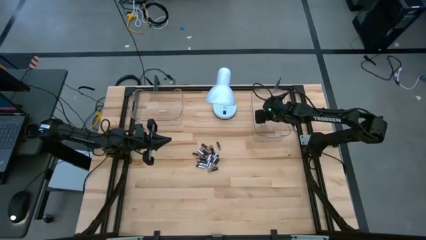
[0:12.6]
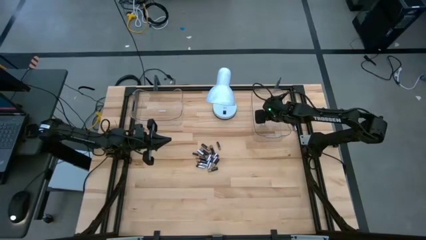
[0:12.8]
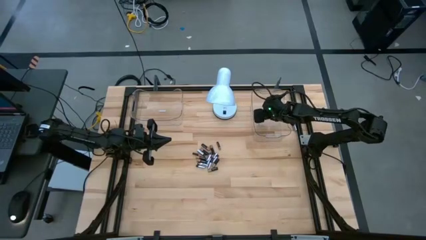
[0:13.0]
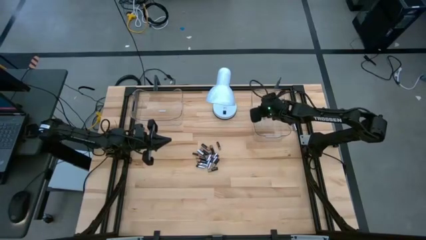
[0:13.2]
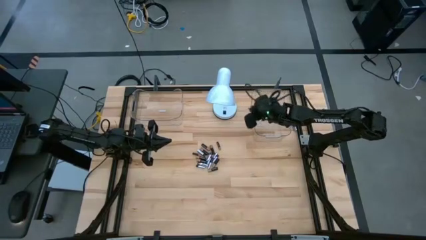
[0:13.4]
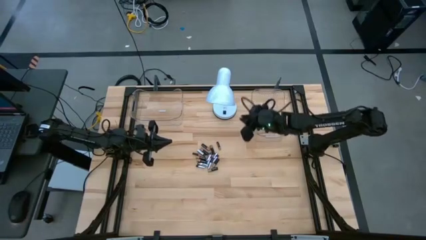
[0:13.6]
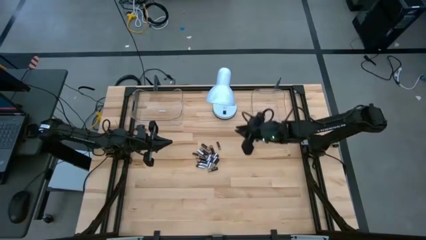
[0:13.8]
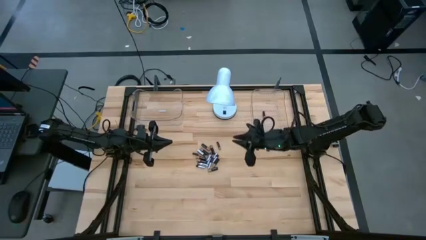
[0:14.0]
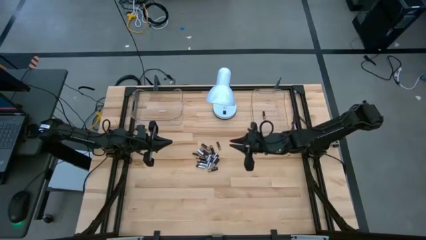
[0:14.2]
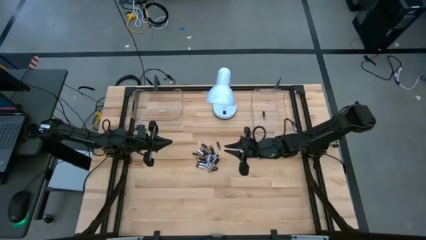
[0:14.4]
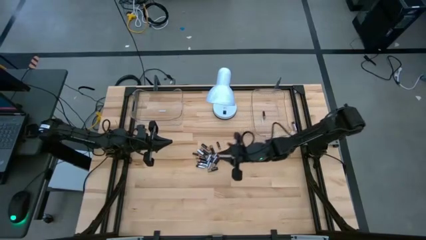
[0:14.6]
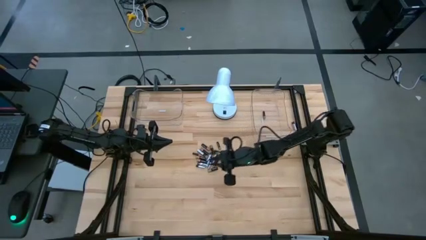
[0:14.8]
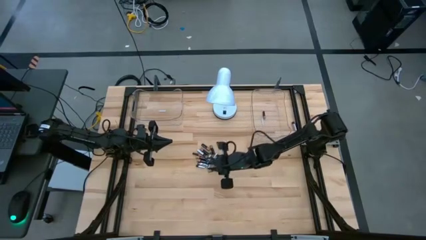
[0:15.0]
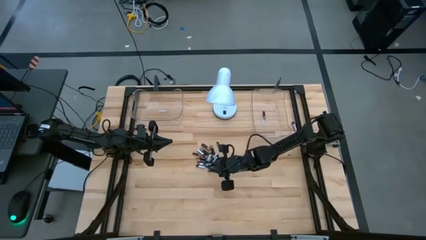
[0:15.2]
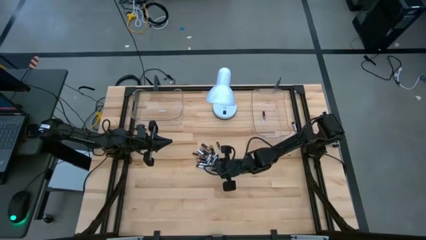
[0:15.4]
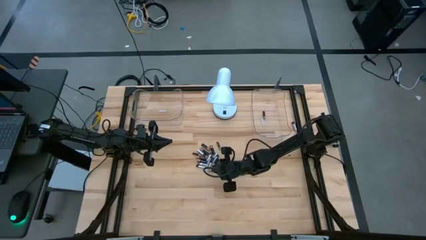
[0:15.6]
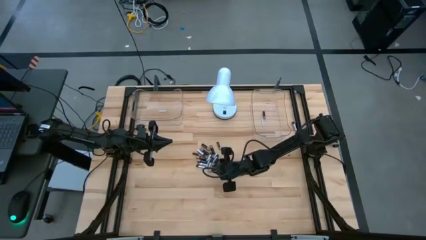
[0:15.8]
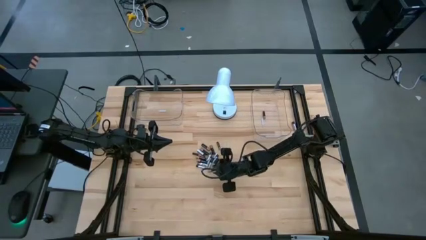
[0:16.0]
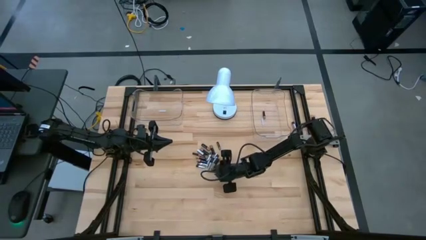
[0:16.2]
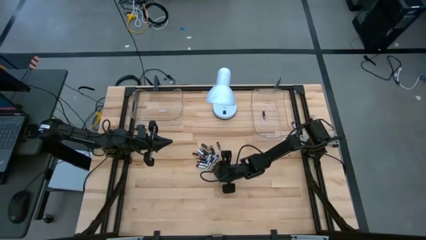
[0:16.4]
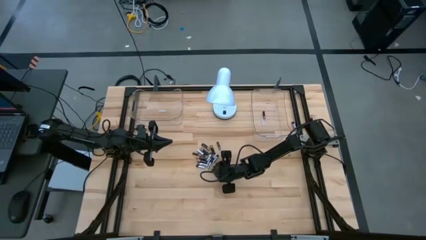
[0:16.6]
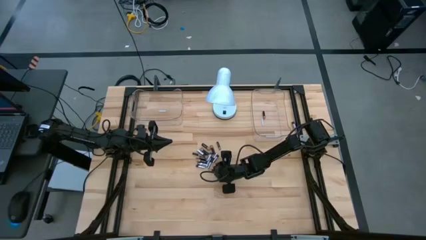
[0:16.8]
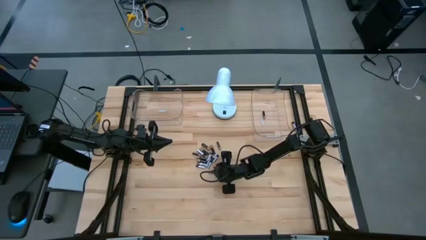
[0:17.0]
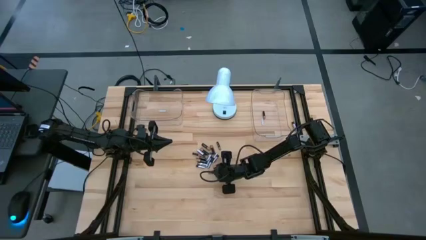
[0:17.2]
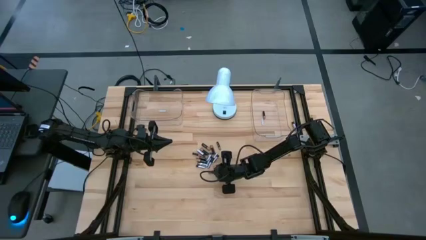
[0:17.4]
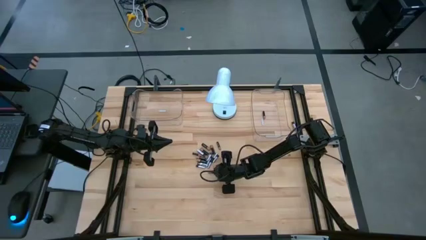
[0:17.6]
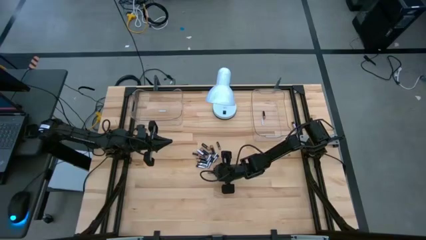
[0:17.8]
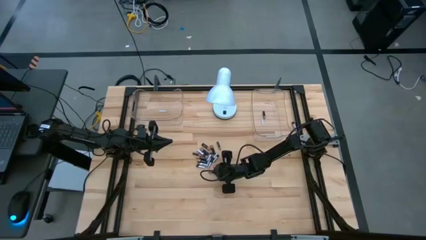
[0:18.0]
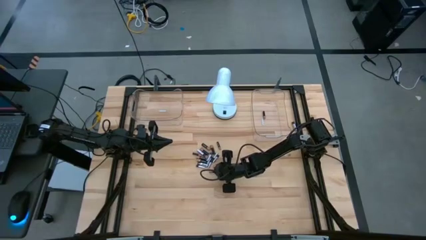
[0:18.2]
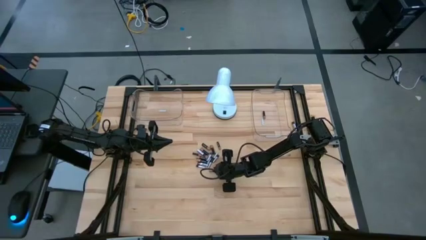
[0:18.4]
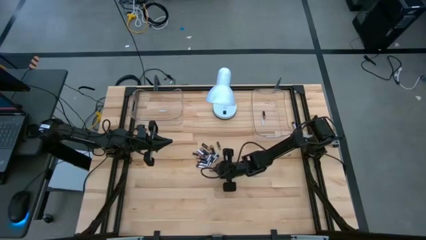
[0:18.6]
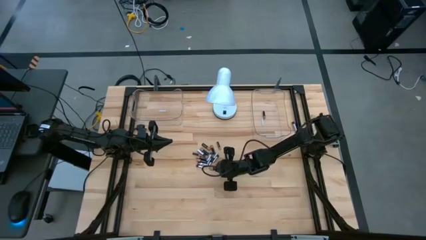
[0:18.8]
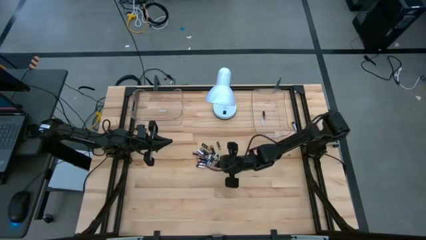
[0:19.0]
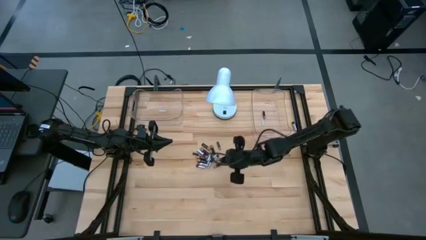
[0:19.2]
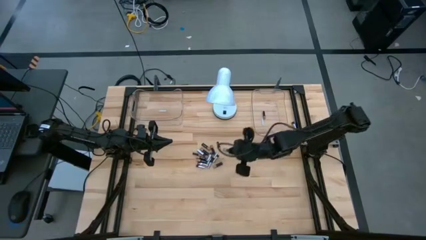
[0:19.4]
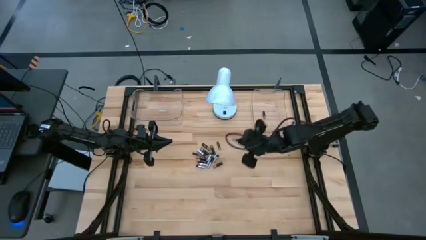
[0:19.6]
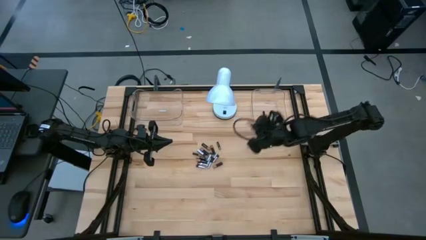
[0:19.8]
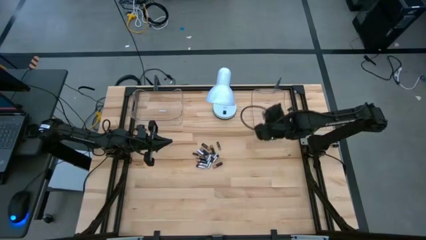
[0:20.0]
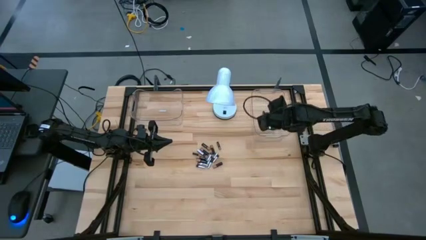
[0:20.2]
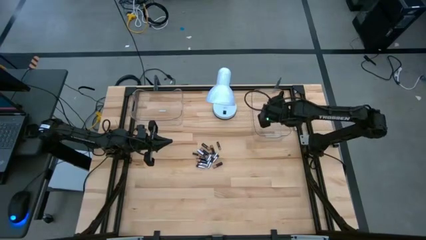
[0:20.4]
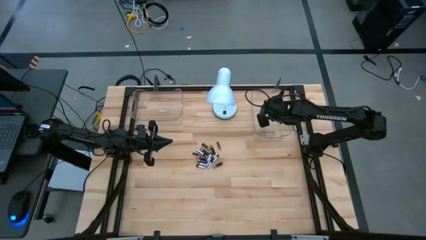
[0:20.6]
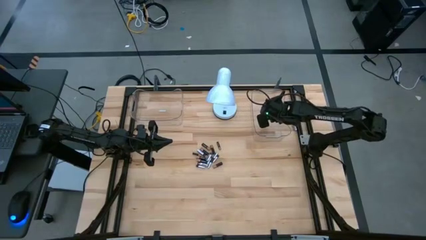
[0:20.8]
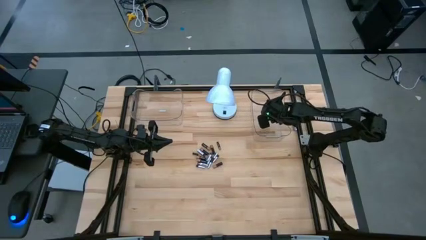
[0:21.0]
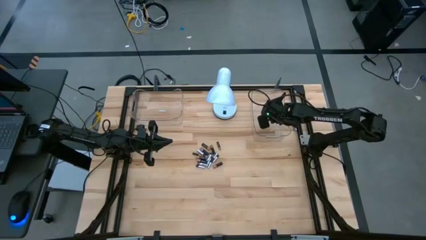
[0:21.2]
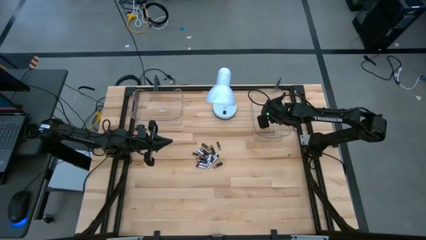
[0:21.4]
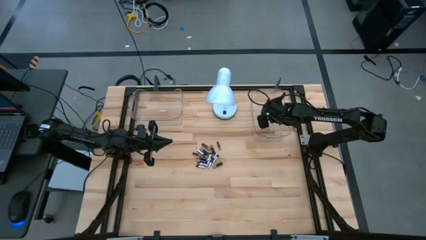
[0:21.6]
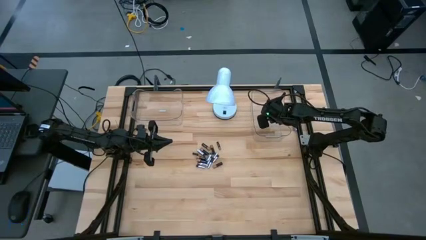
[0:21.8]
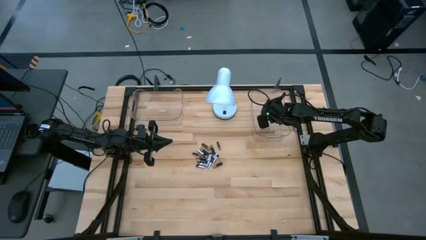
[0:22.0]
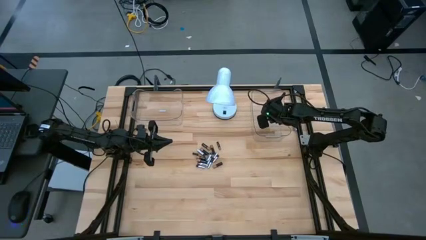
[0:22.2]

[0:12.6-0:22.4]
Task: Sort batteries
Put the black battery in the transparent bin

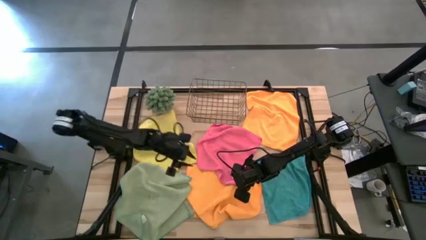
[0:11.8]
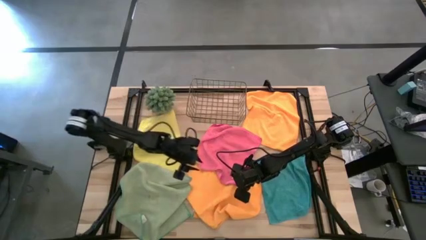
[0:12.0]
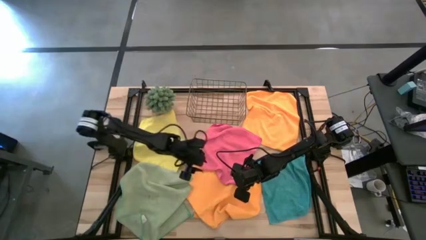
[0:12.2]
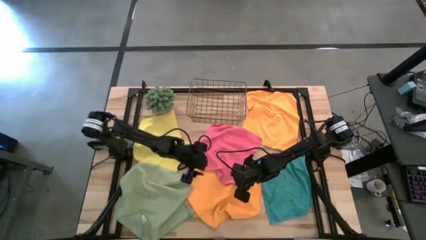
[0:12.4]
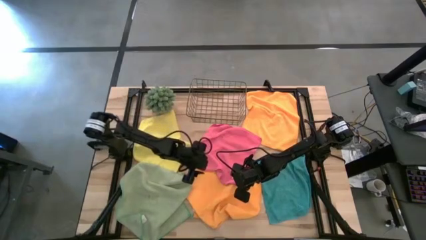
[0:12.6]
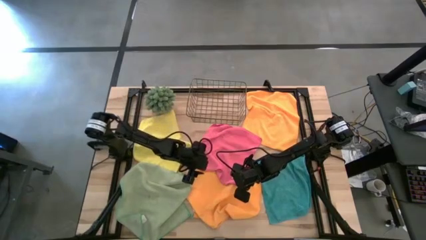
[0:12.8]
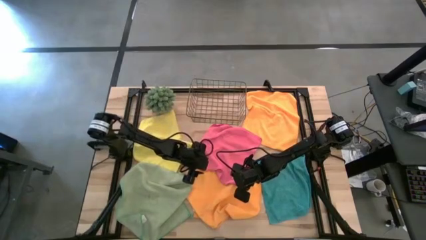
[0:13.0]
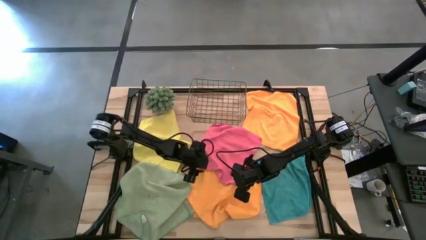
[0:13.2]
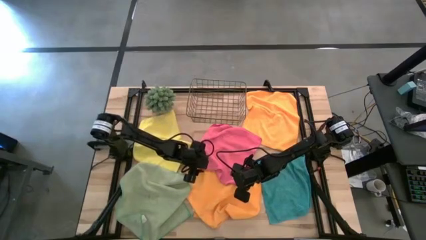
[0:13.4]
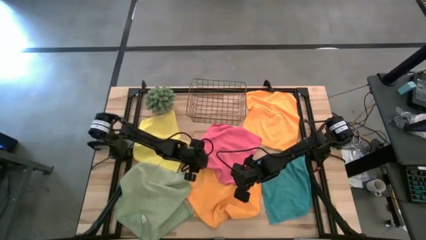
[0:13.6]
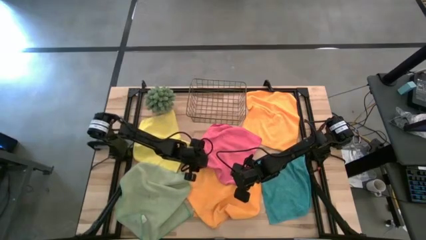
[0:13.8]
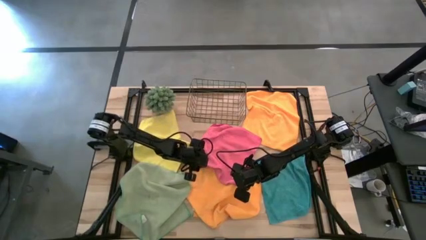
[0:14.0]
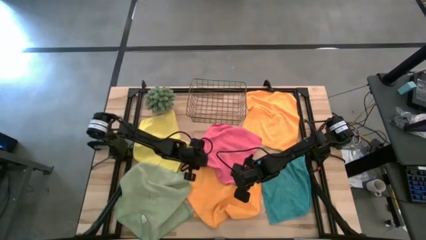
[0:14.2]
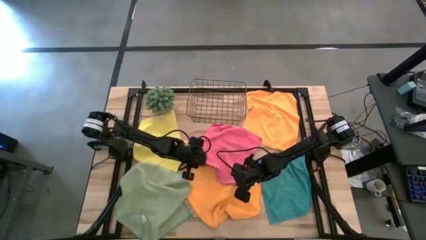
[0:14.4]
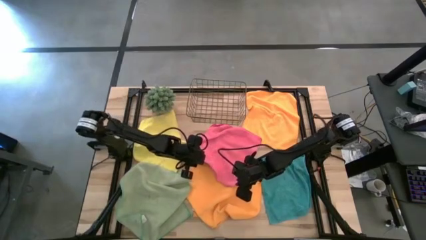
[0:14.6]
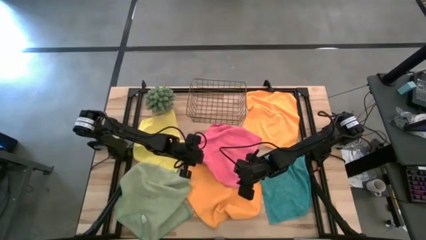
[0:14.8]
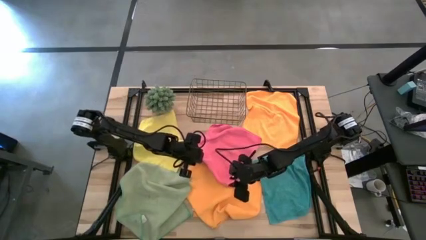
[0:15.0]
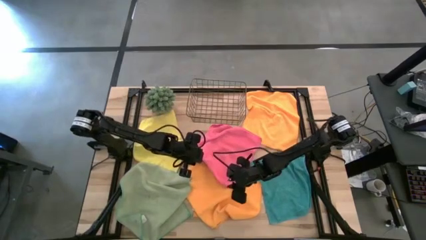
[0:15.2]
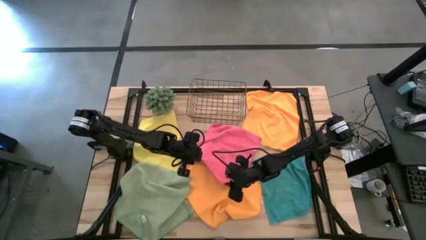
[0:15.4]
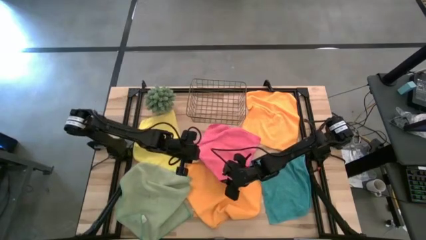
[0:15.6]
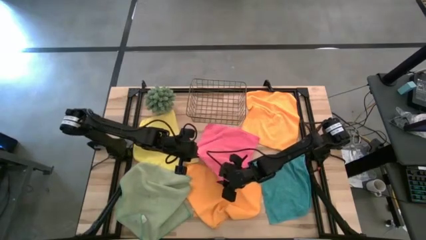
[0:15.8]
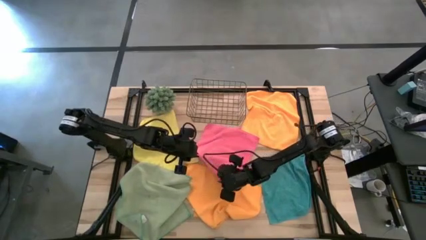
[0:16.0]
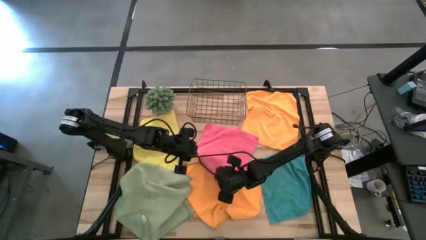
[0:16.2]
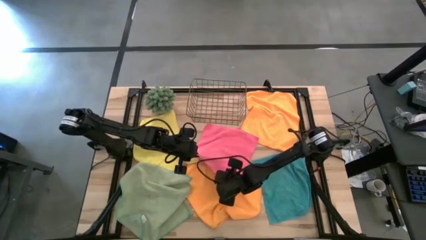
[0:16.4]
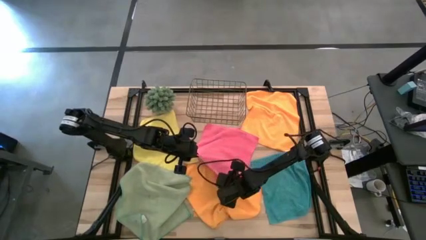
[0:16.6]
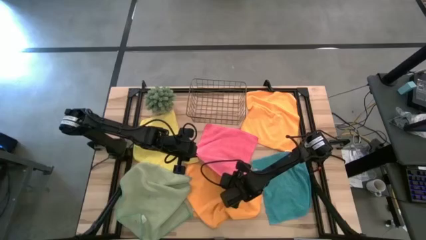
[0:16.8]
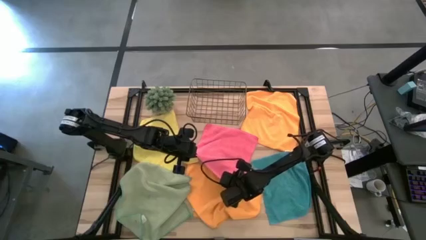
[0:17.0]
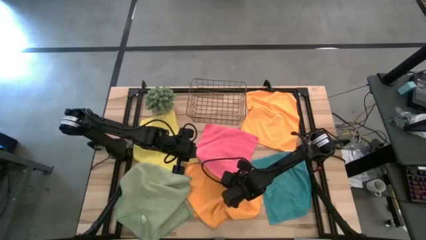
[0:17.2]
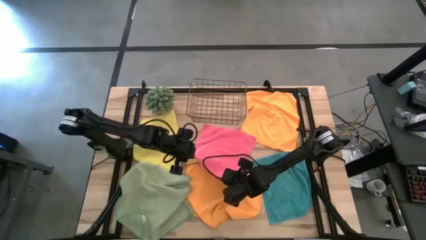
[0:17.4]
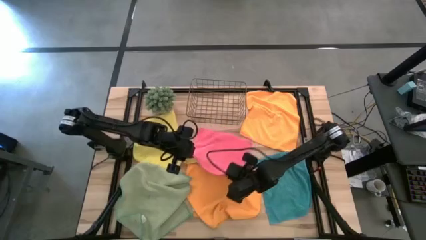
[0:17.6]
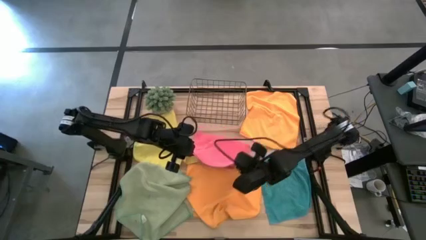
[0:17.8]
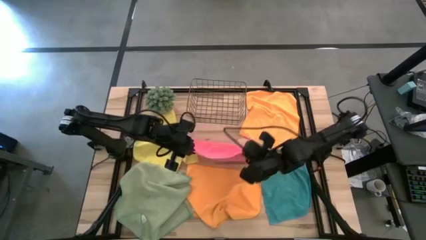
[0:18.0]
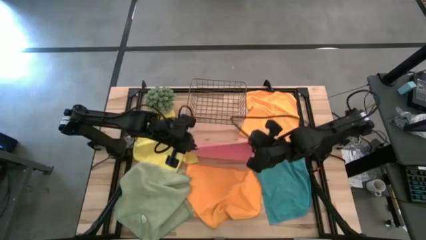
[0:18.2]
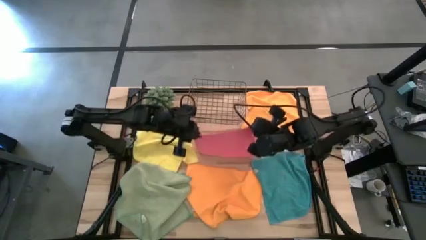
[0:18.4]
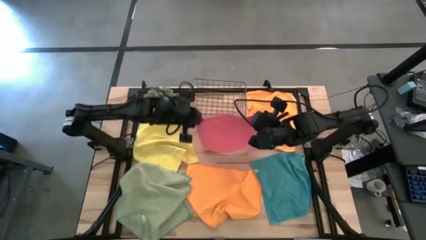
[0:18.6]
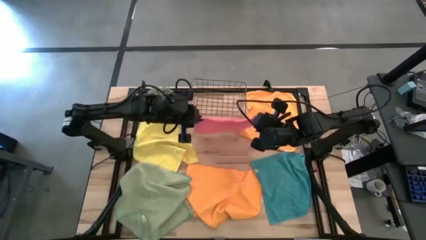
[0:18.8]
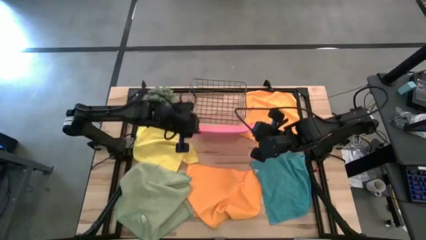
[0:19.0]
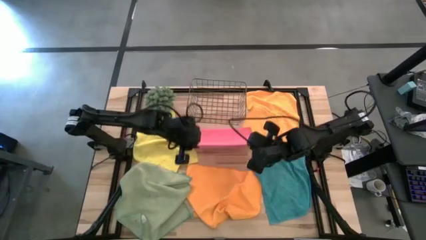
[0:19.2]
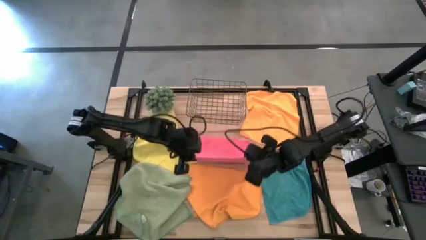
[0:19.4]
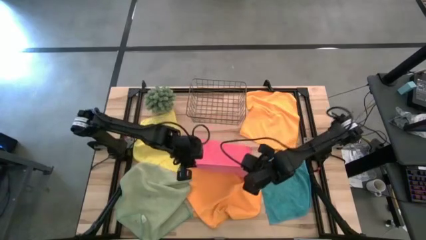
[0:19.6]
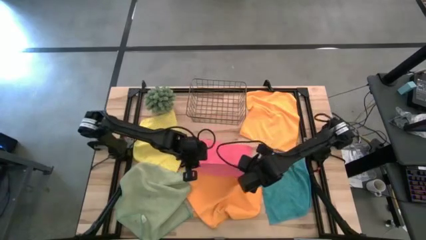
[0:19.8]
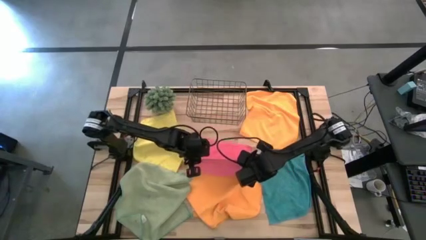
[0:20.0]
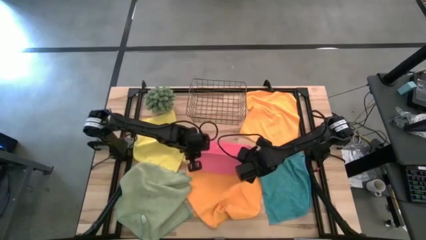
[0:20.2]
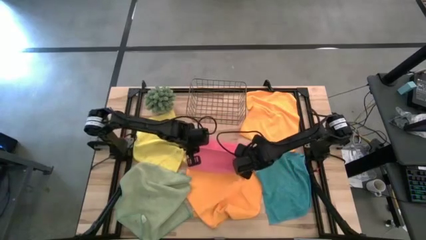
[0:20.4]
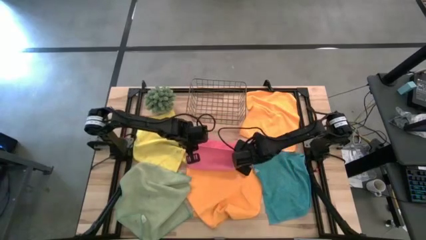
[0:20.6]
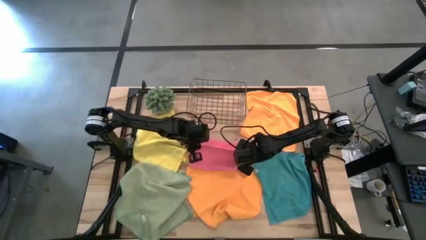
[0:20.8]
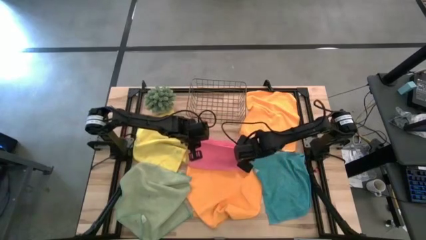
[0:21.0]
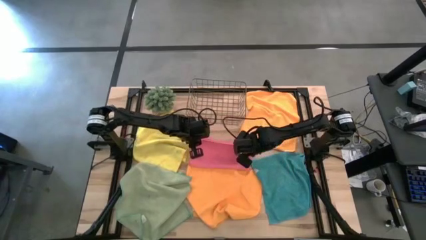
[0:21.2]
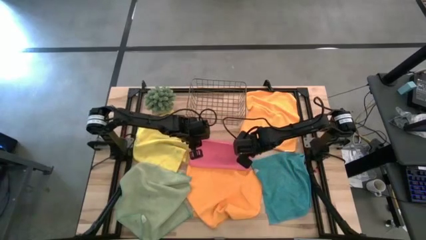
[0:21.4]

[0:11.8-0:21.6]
Task: Fold microfiber towels
Fold the pink microfiber towel
